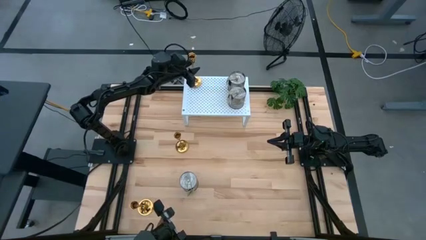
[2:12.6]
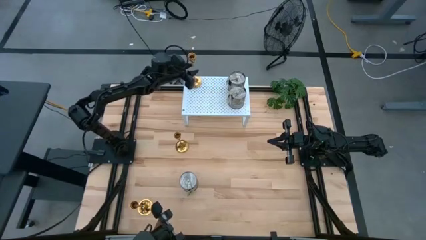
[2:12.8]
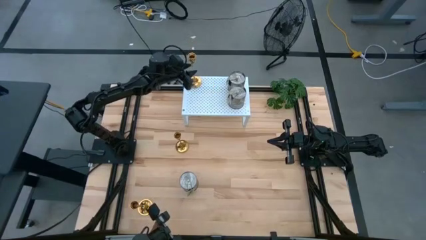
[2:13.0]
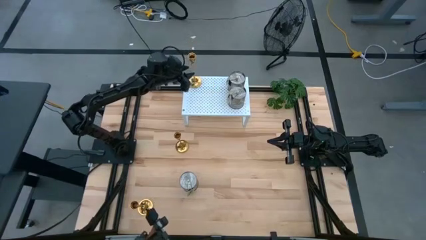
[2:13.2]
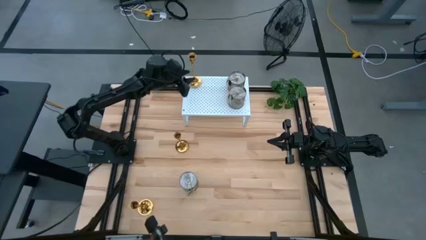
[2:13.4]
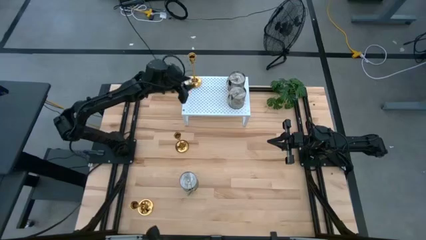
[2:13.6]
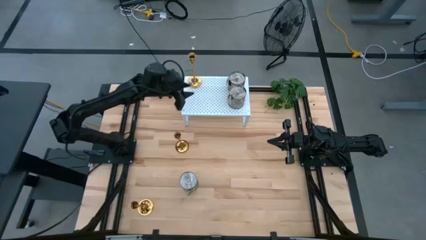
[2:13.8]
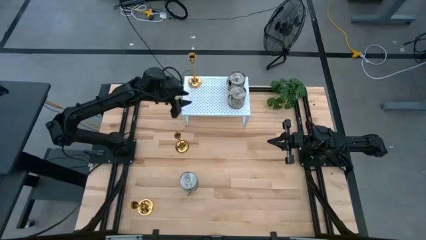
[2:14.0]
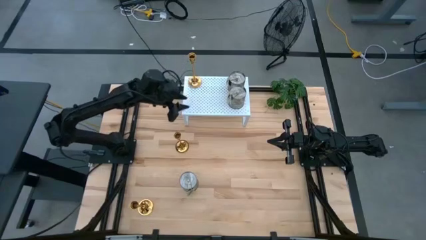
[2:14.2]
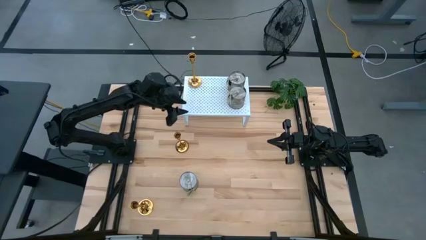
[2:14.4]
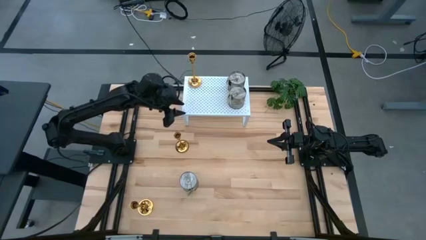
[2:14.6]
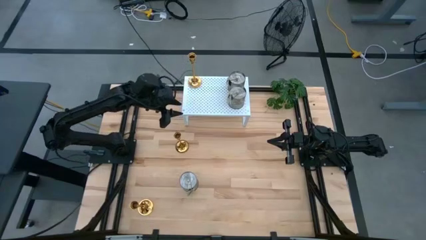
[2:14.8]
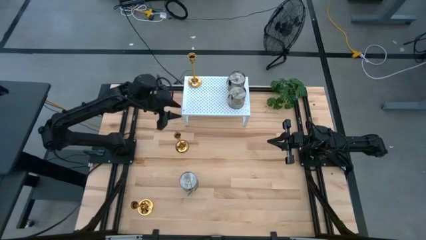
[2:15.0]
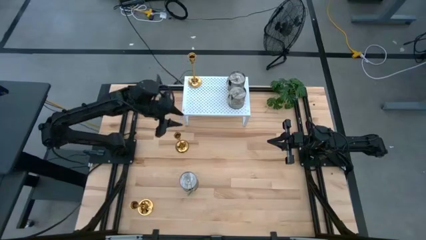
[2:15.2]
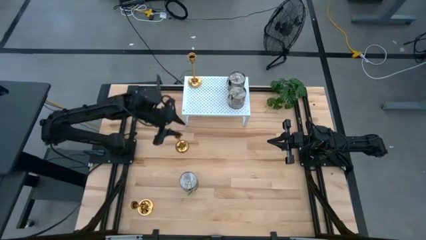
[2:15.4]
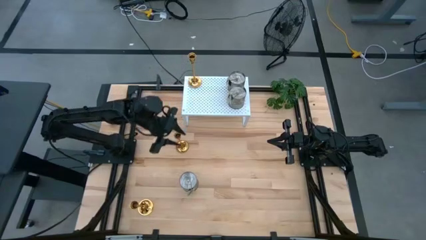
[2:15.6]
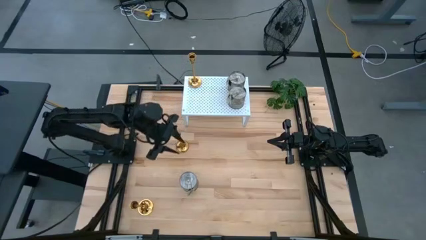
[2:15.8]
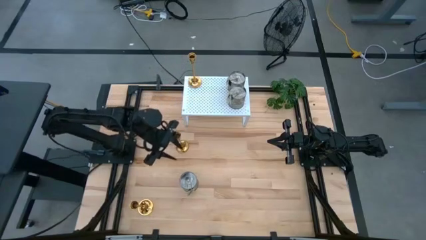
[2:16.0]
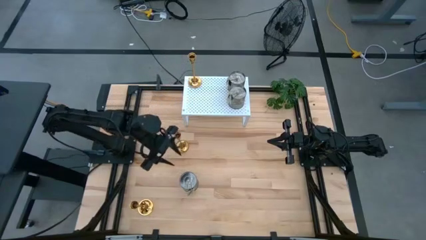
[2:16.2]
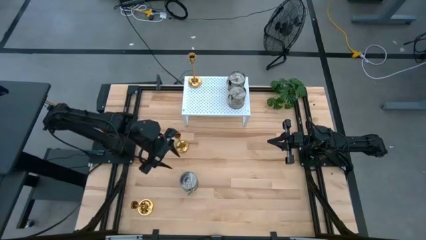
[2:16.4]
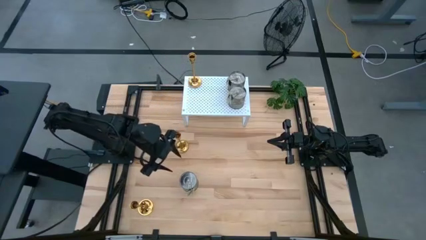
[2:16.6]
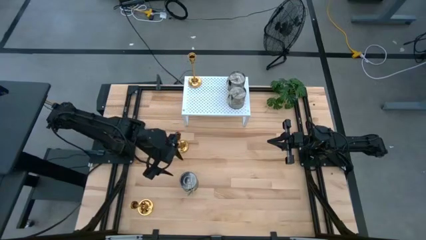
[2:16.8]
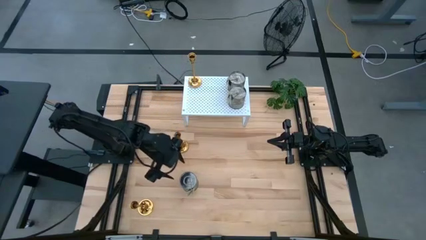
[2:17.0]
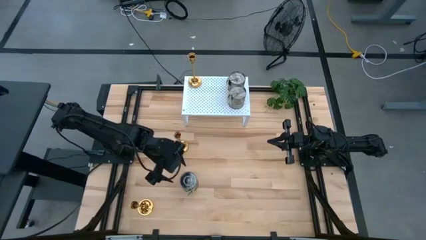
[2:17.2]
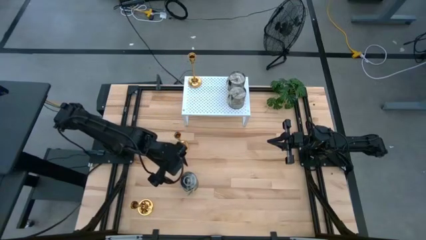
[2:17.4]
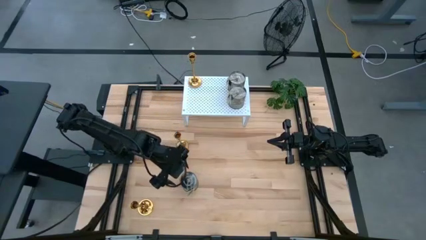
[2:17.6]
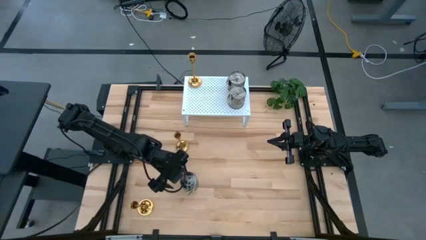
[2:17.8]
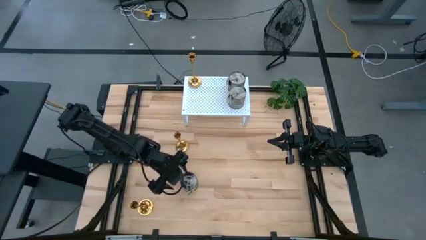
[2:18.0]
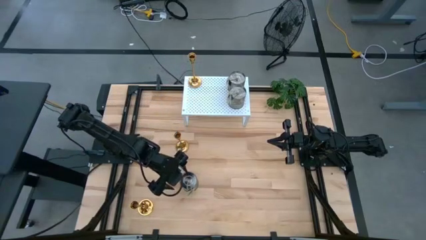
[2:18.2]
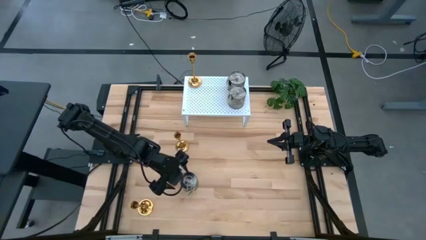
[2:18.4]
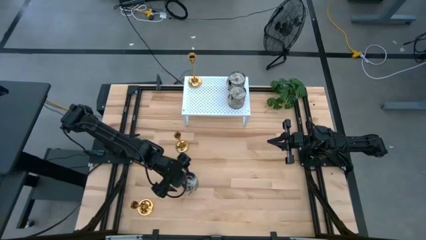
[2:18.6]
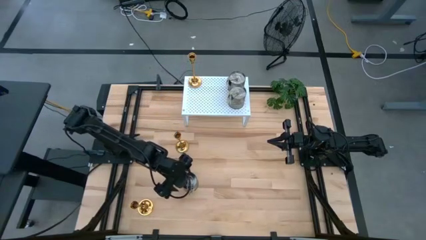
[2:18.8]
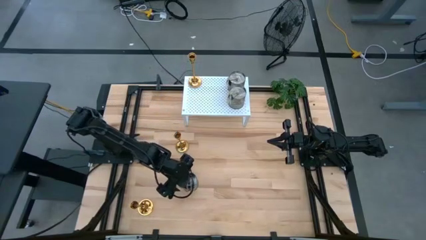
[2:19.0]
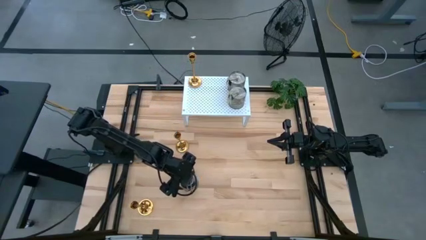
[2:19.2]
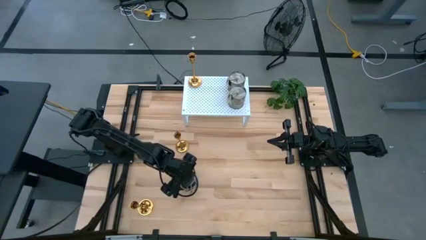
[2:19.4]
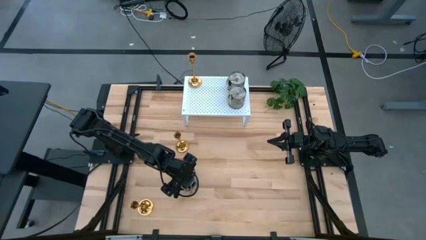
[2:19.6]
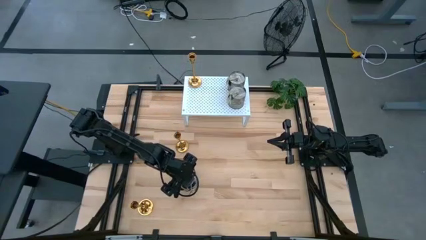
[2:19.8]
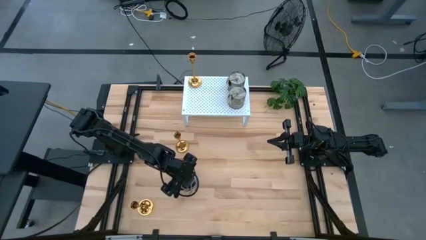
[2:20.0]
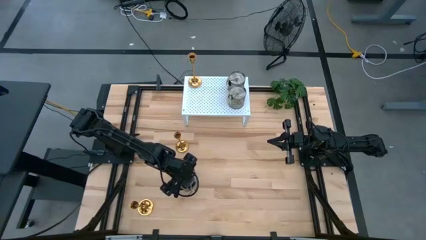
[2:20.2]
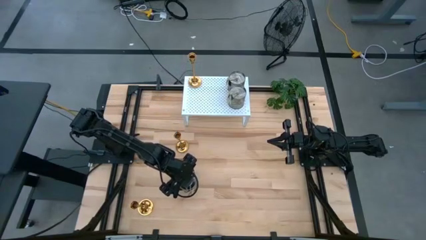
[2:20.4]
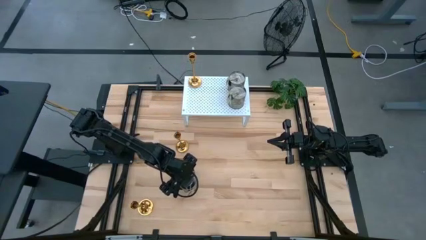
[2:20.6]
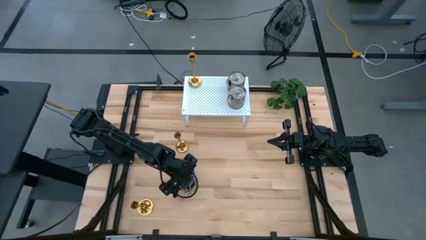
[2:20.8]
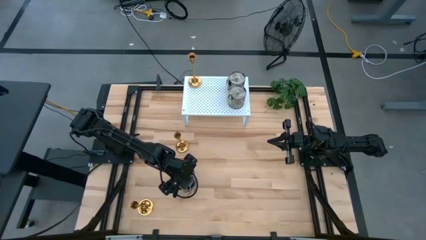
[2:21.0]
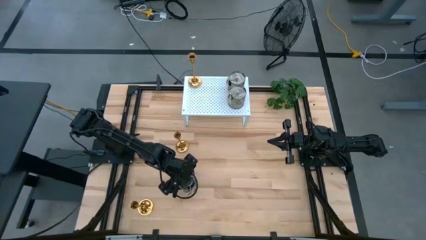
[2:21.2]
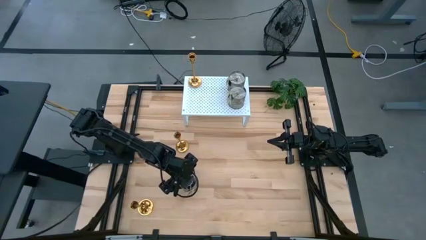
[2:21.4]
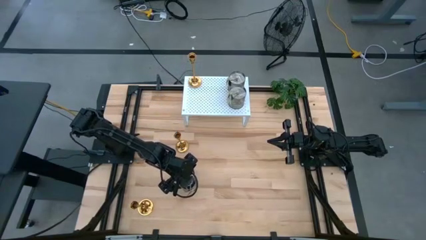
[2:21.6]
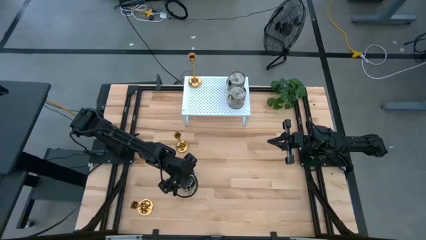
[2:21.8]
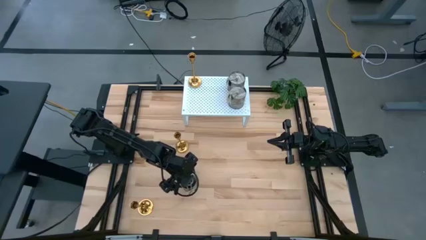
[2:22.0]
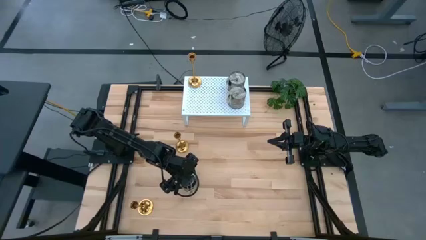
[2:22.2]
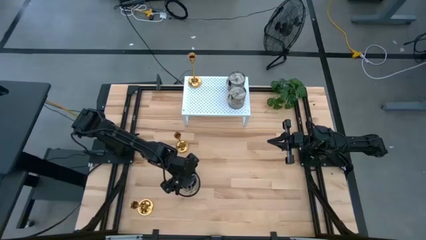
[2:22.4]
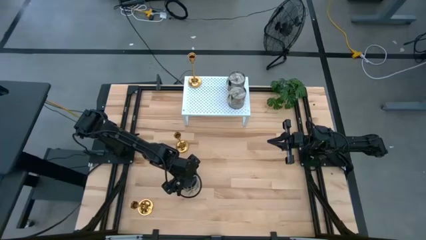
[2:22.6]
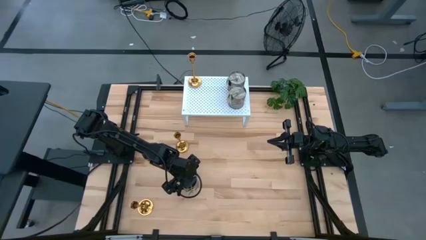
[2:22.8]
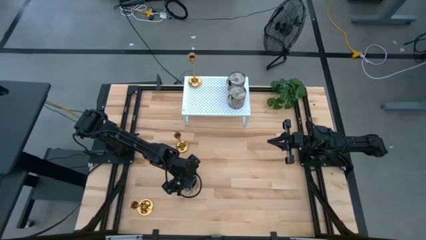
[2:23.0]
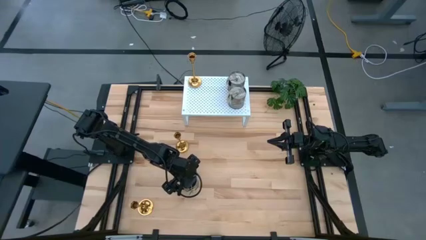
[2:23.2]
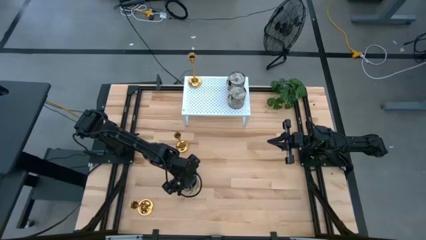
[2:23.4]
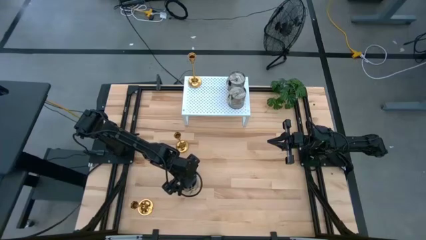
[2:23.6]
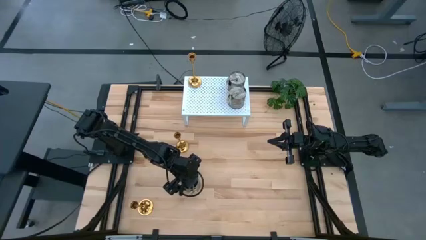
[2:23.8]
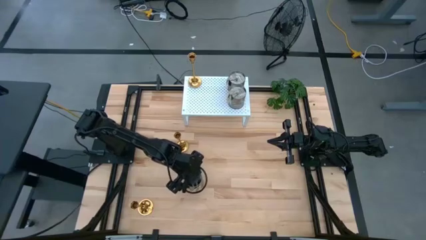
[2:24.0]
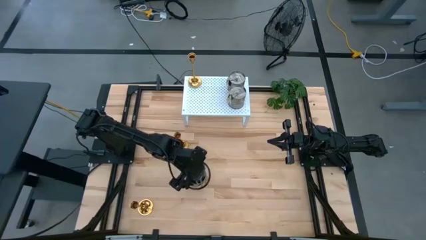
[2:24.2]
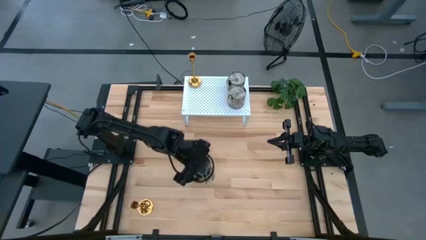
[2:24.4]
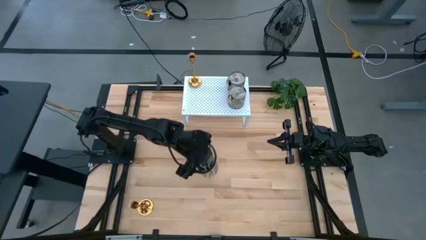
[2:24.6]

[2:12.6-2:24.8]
Task: Pick & Place candle stick holders
Put the scented candle can on the shelf

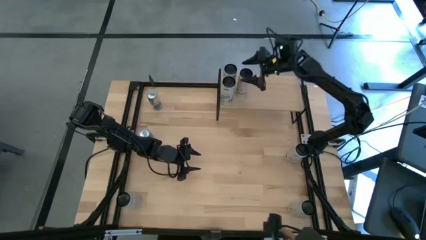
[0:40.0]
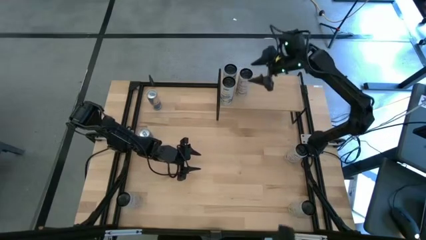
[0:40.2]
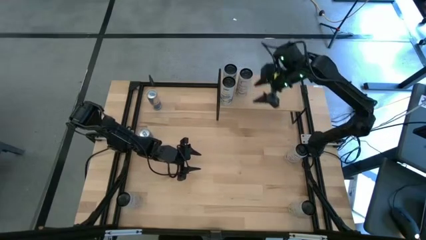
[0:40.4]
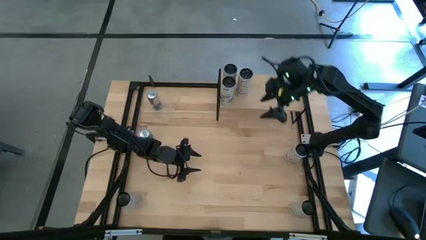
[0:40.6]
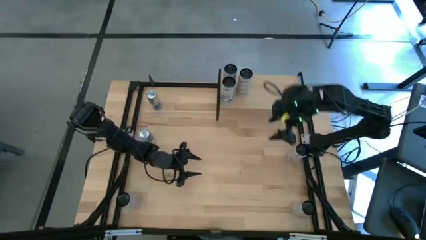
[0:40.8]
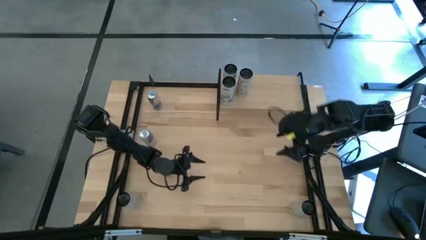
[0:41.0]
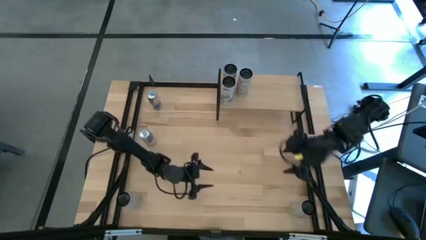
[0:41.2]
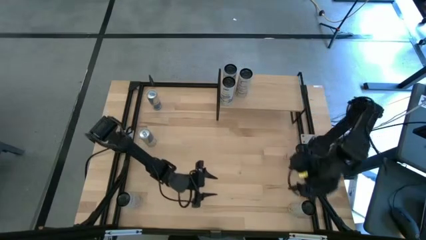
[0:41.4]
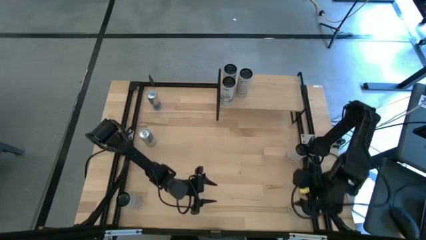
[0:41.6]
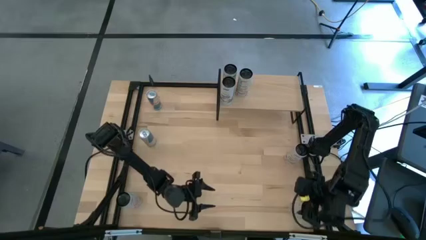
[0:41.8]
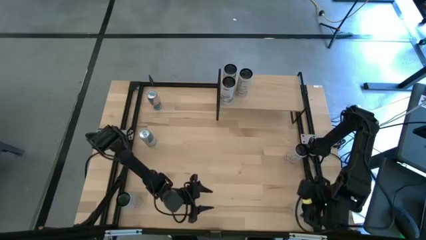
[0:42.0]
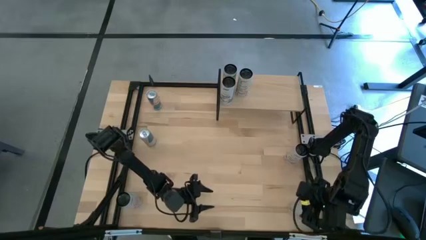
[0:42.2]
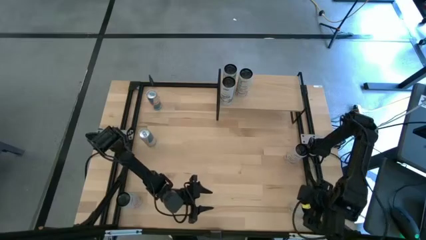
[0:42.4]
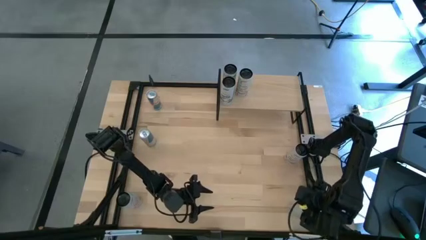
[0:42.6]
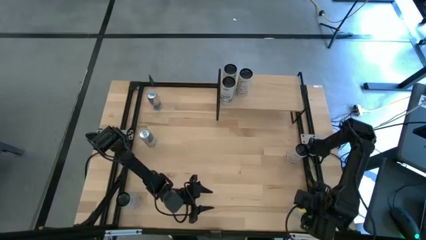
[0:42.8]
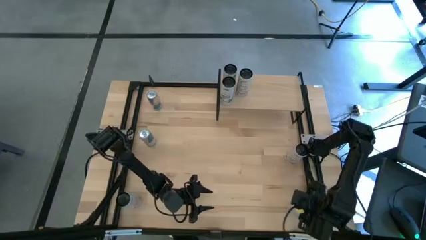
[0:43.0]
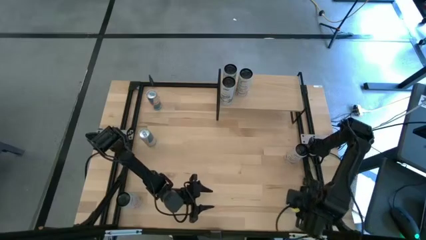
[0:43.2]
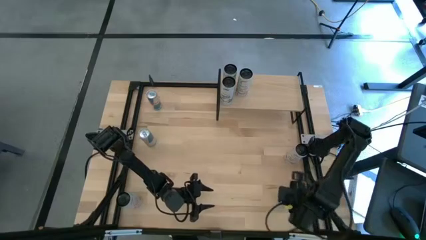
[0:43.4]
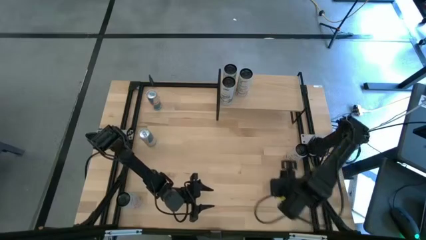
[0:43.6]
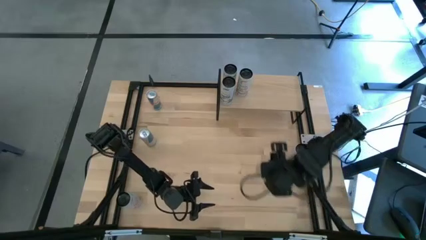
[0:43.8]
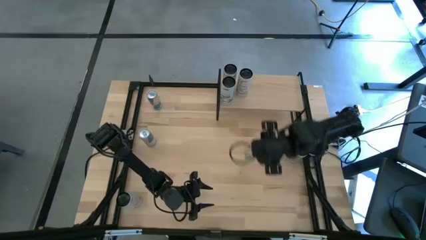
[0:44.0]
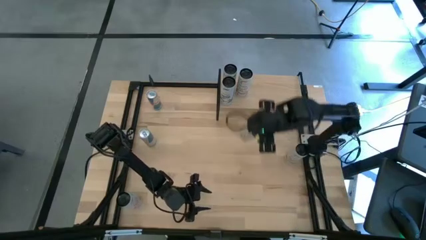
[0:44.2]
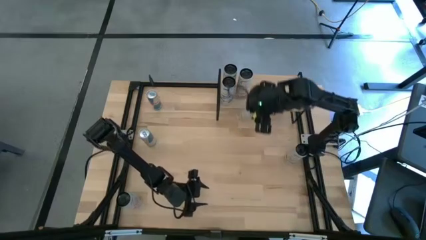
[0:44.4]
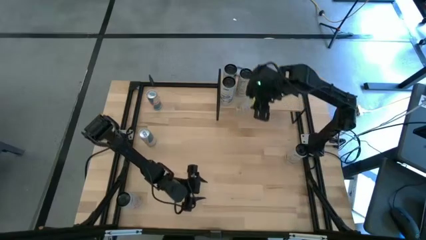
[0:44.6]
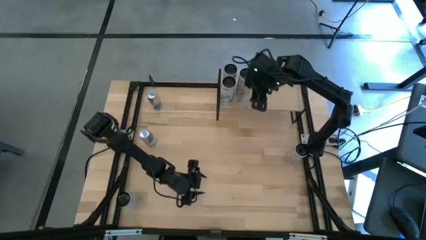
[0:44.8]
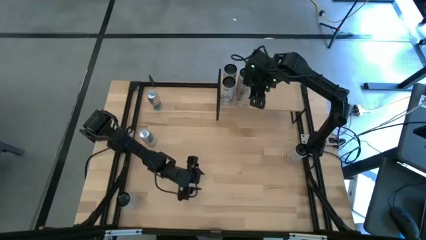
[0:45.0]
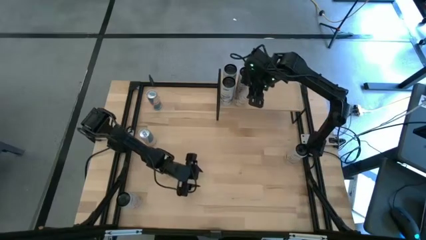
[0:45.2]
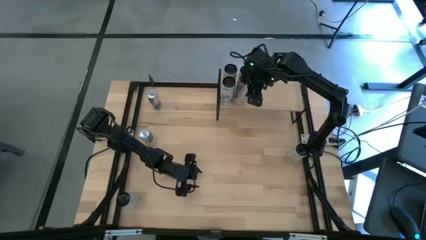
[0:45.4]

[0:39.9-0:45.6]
Task: Place canned beverage on shelf
Put the white yellow soda can aligned with the other white yellow soda can on the shelf
